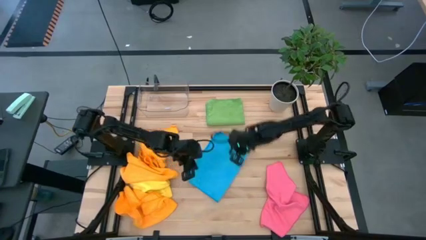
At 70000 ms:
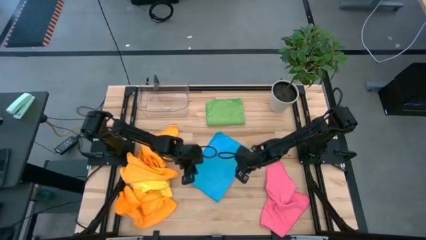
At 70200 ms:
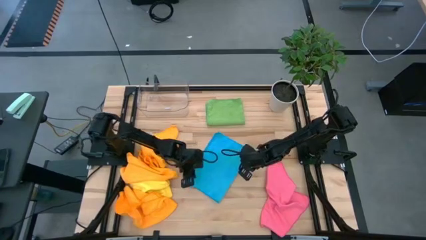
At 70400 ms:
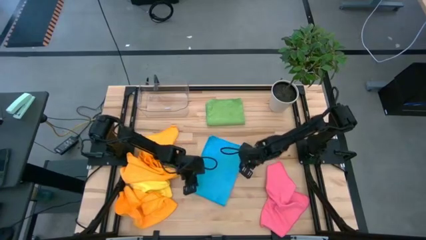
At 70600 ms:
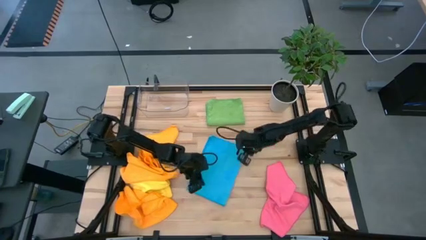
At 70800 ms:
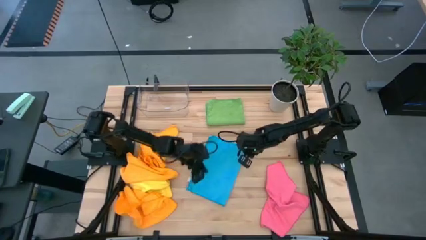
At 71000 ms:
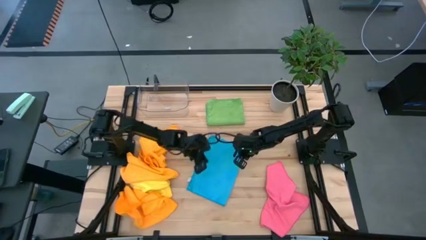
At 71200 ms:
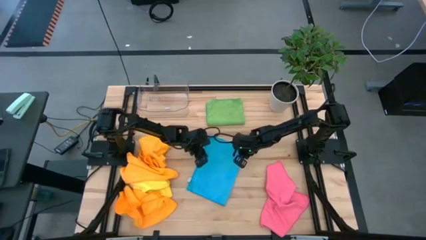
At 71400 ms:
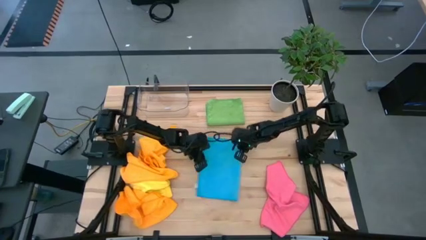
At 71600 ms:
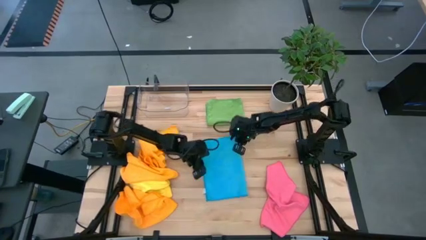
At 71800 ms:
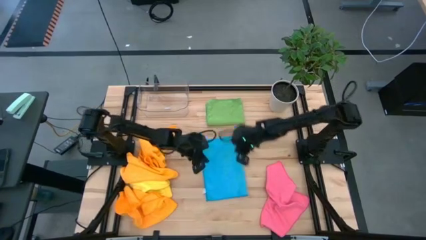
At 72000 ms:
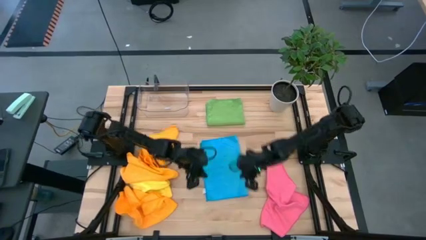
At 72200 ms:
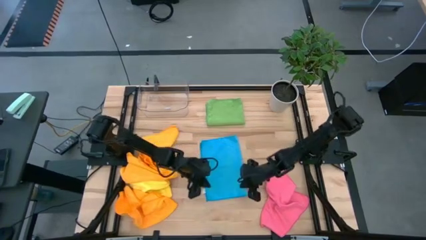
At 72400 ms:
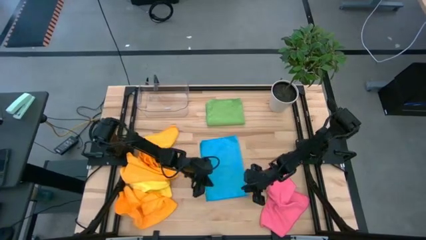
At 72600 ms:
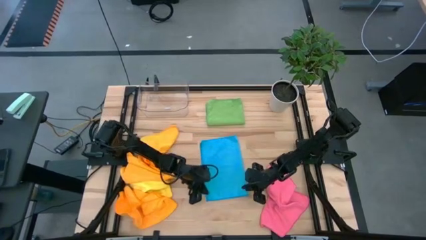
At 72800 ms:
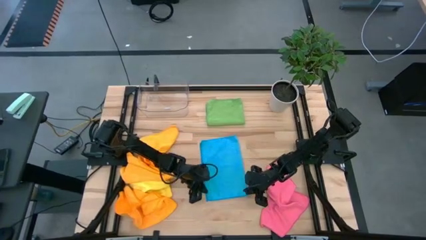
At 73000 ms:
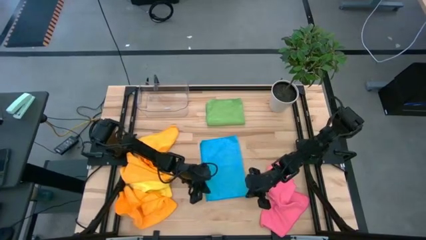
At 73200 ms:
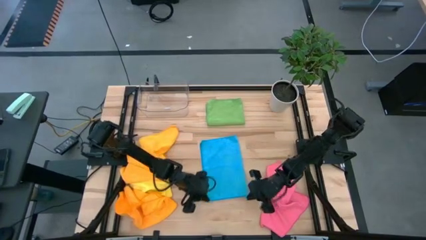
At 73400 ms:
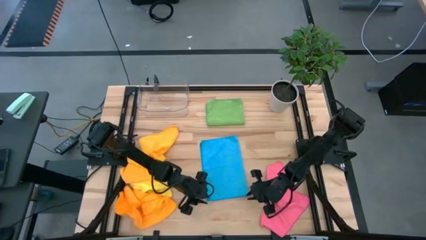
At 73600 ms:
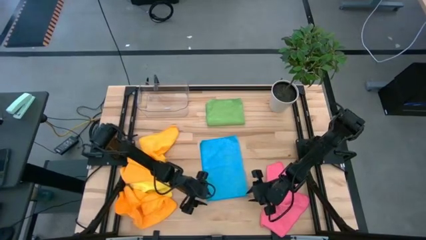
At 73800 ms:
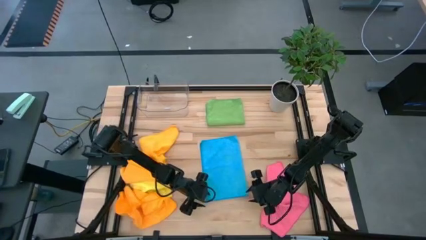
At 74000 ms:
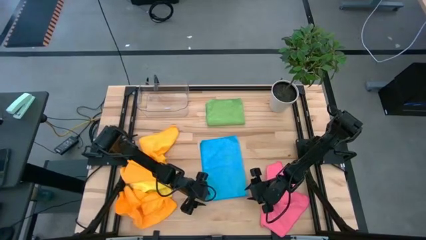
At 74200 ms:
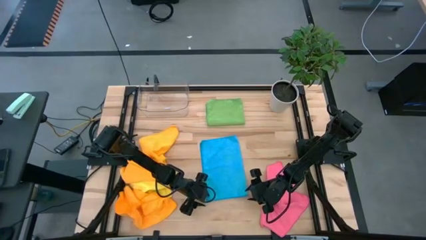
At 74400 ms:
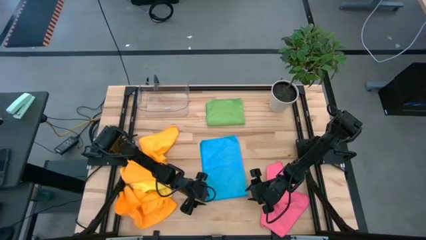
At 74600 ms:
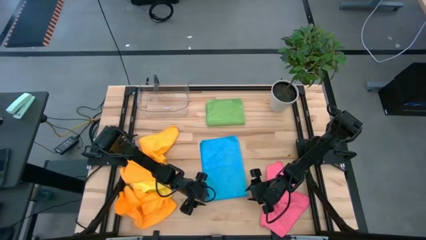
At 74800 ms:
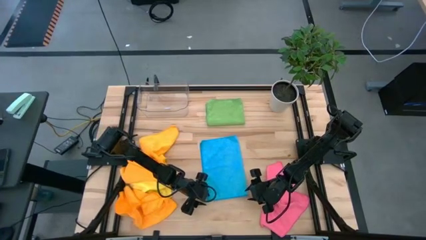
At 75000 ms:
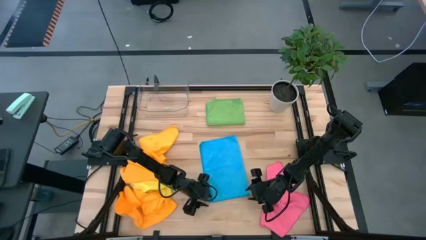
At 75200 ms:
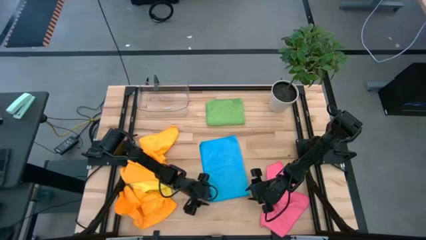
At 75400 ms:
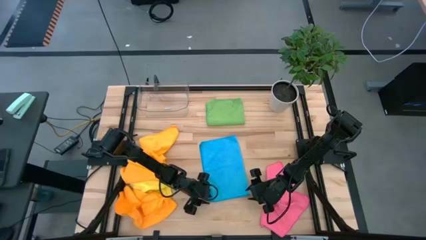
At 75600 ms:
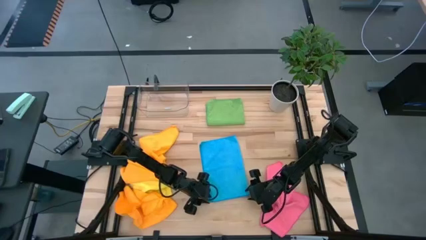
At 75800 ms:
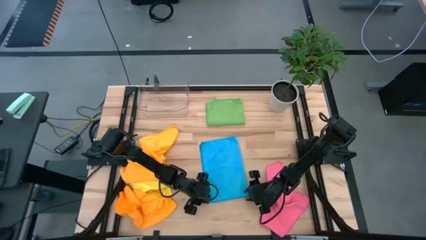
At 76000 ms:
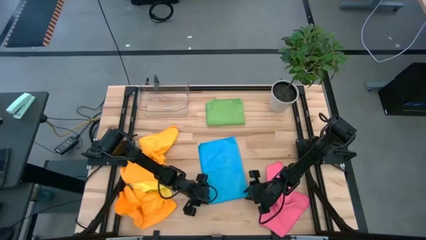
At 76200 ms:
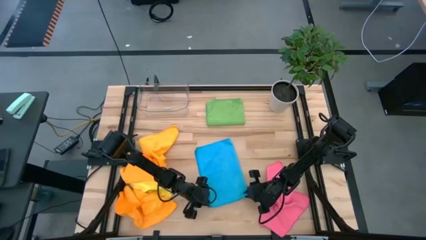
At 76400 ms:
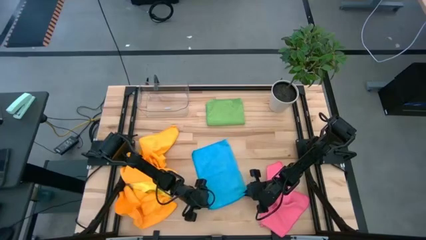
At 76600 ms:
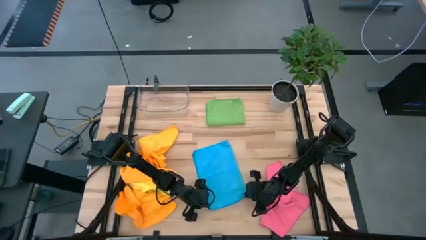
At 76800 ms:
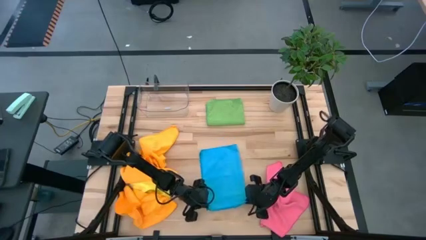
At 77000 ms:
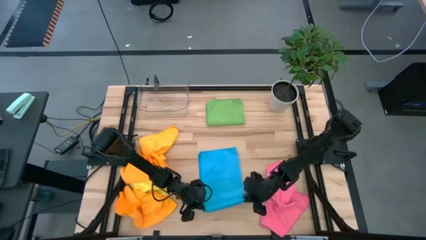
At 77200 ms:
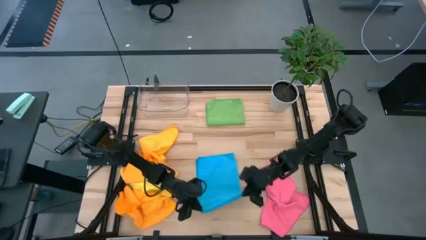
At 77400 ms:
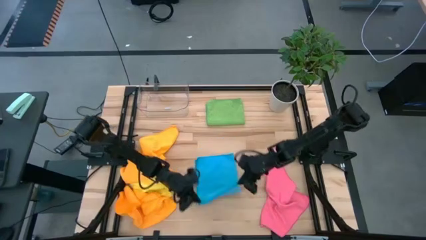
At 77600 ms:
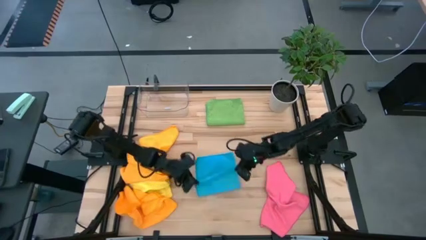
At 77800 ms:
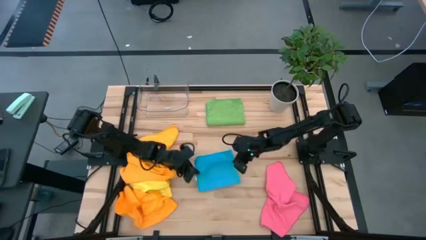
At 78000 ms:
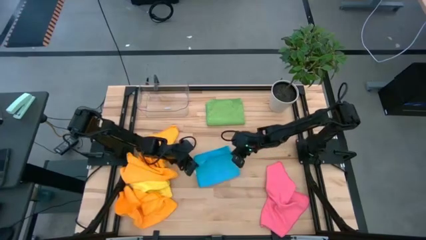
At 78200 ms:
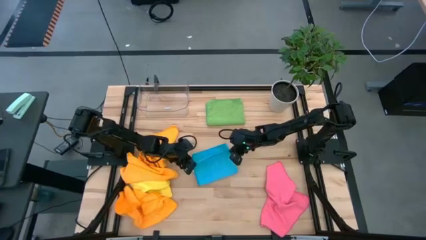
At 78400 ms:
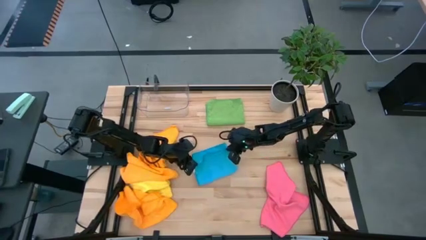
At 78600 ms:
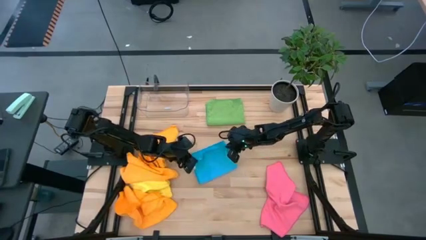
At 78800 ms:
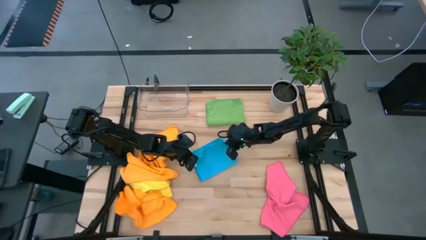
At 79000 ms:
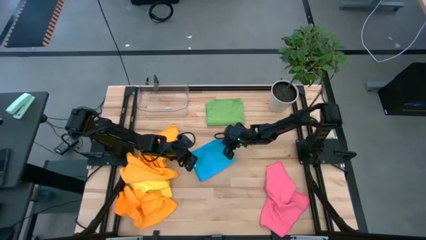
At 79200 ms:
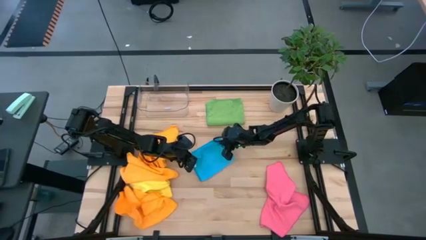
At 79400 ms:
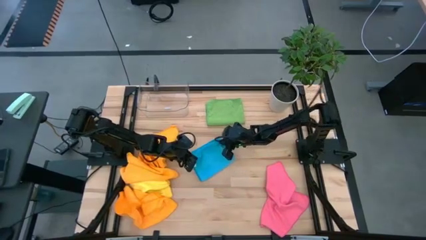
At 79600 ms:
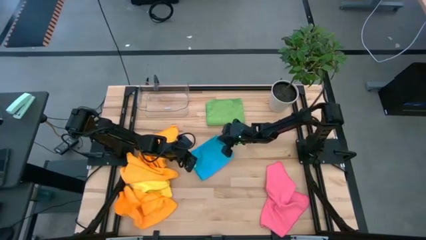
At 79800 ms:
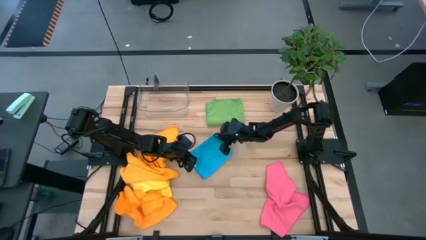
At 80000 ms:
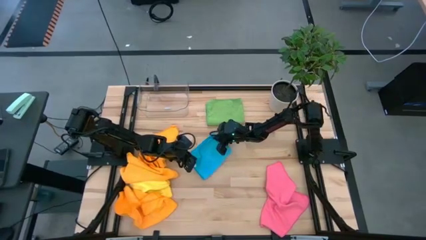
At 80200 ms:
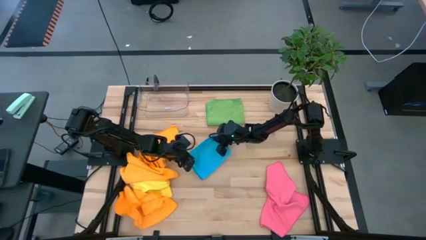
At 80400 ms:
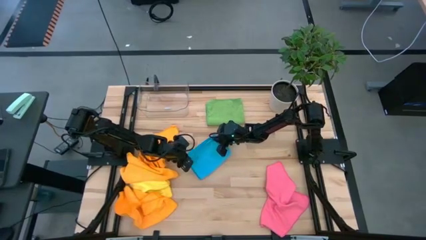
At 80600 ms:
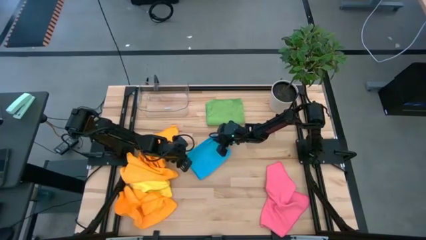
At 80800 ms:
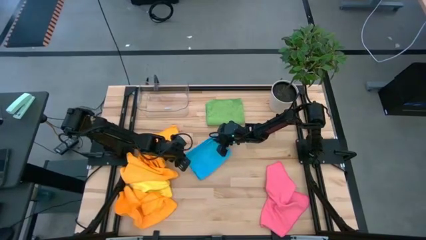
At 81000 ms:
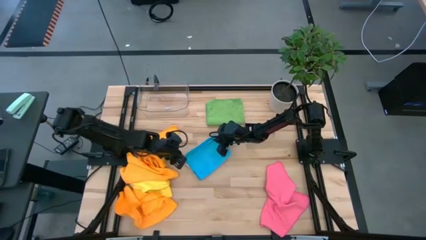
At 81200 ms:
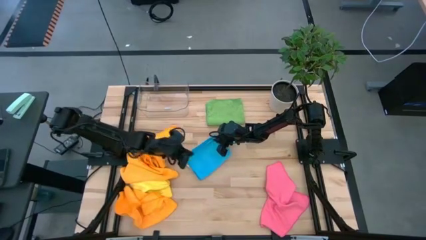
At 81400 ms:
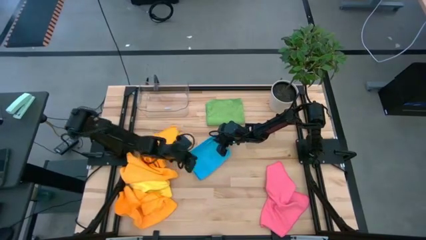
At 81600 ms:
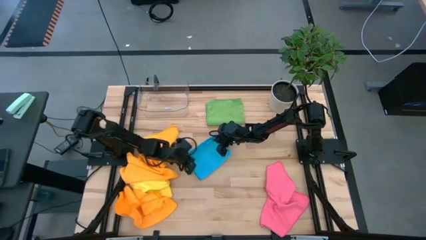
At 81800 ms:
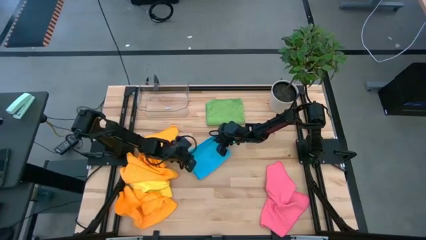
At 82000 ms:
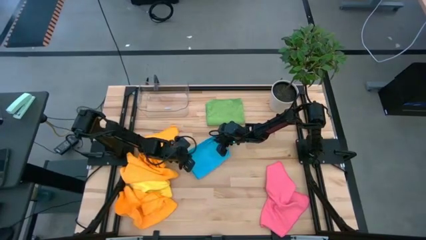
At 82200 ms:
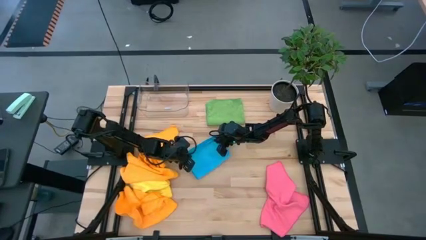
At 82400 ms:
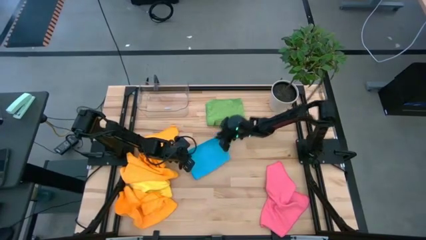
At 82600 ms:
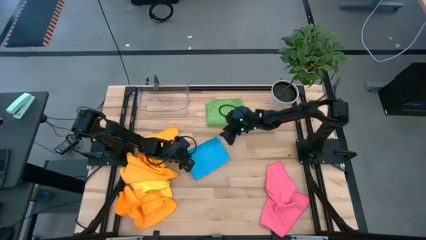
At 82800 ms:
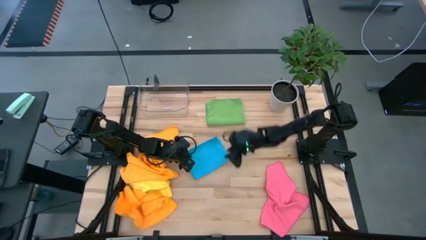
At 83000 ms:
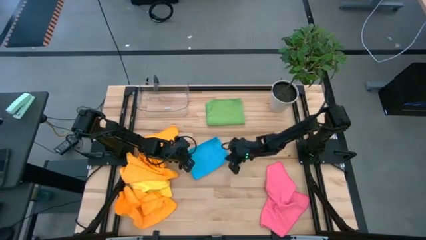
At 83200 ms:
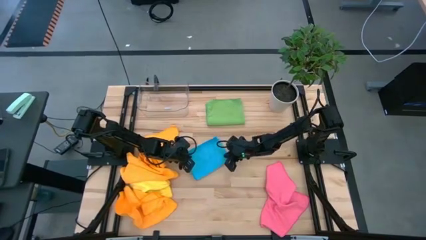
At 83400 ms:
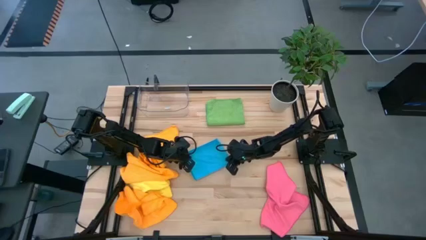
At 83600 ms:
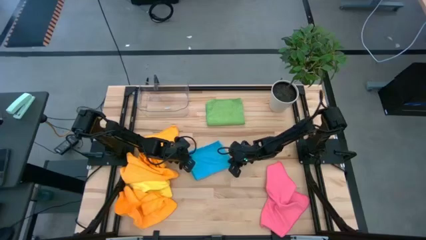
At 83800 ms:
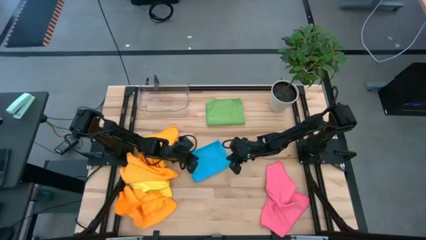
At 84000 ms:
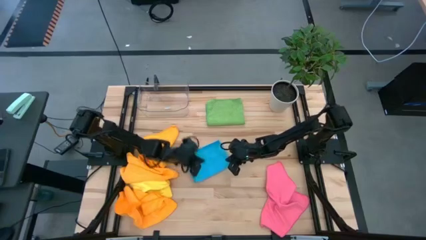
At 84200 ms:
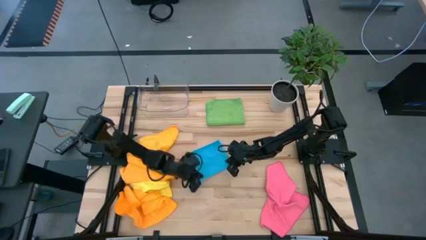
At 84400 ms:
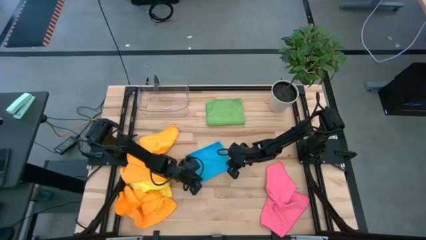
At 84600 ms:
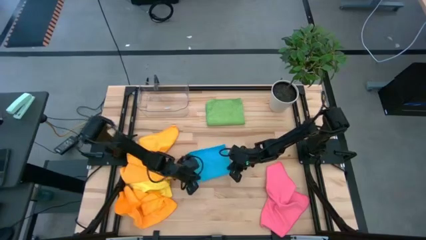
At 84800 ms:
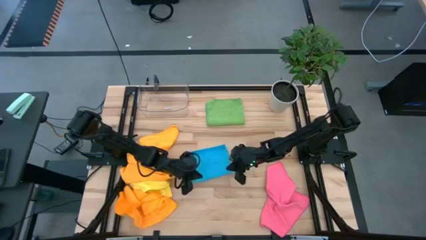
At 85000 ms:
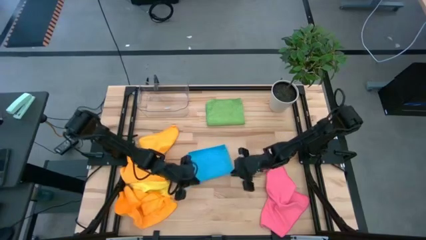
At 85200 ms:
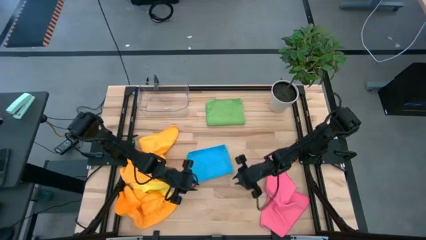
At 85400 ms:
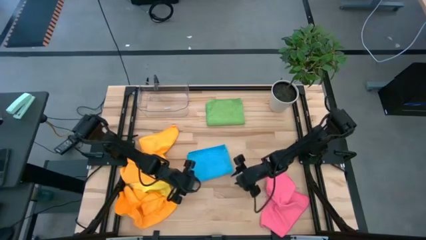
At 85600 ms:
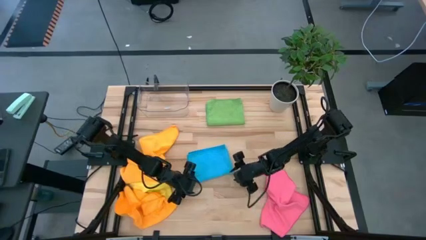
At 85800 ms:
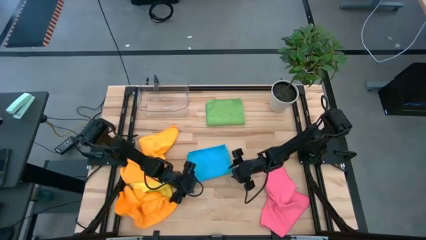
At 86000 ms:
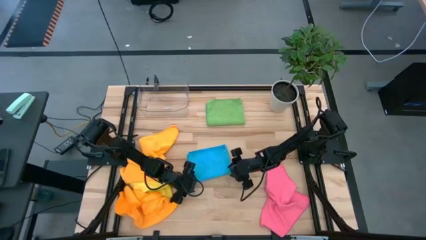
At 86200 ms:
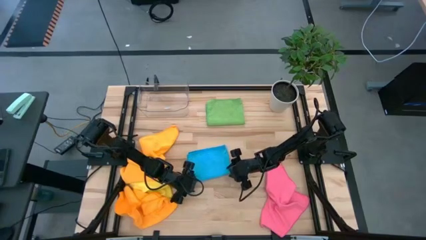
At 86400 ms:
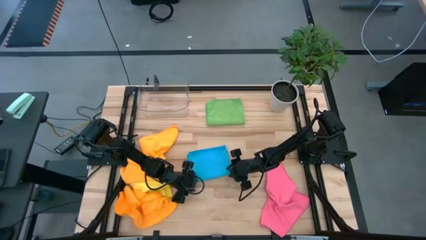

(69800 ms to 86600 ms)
Task: Fold microfiber towels
Fold the blue towel
